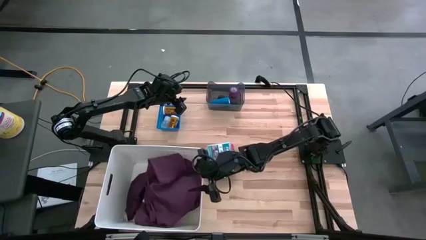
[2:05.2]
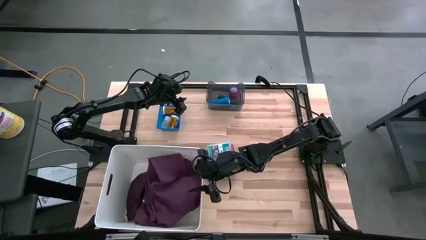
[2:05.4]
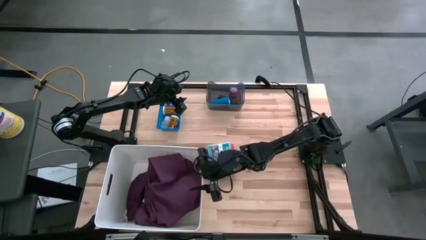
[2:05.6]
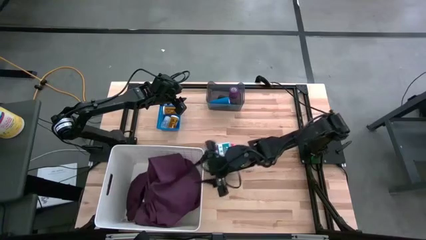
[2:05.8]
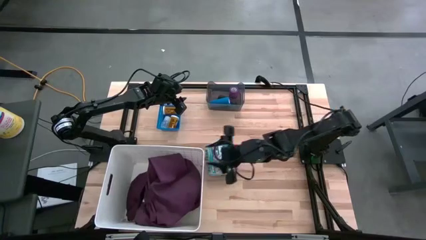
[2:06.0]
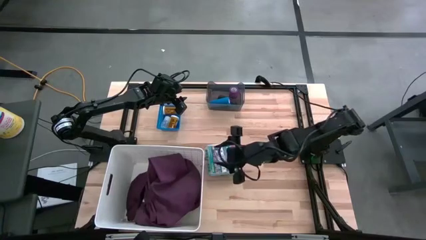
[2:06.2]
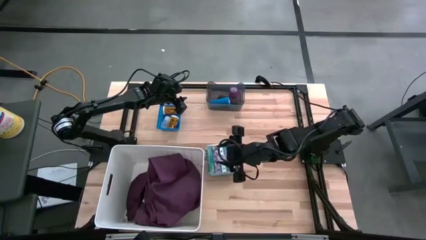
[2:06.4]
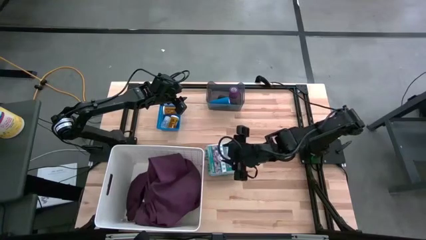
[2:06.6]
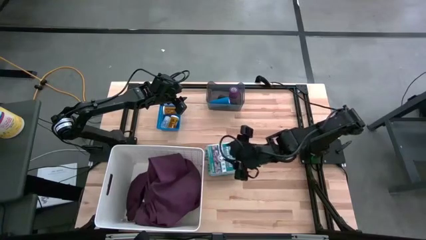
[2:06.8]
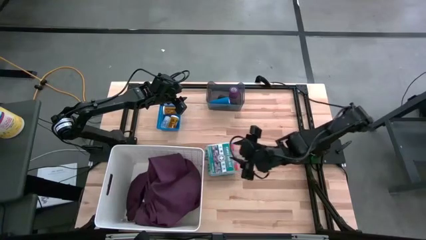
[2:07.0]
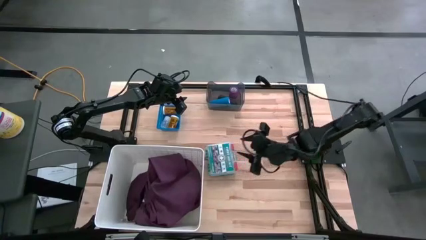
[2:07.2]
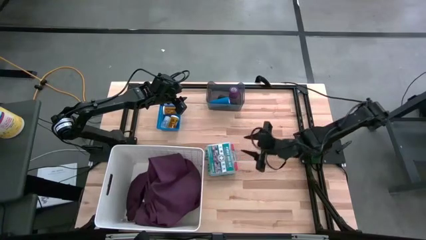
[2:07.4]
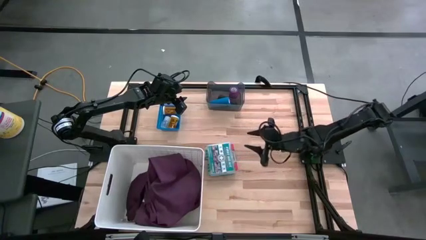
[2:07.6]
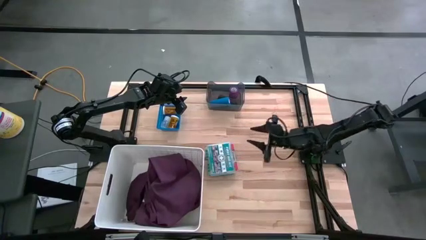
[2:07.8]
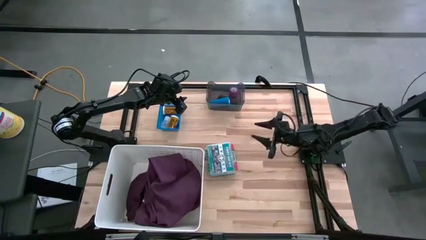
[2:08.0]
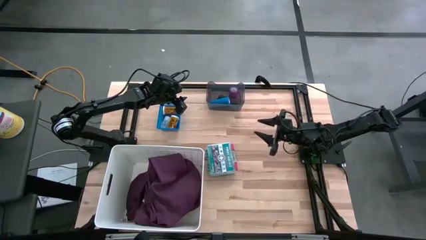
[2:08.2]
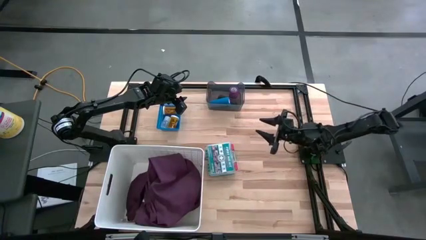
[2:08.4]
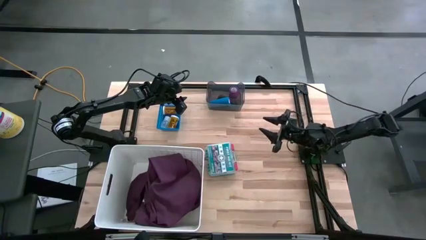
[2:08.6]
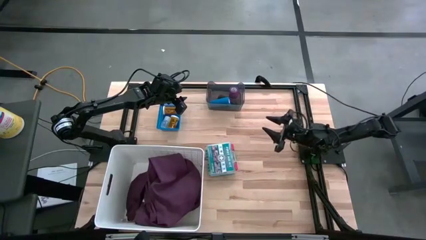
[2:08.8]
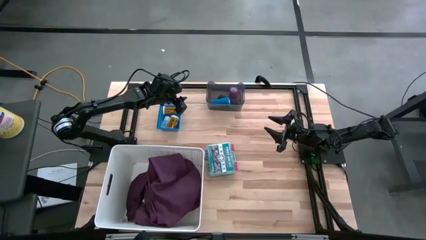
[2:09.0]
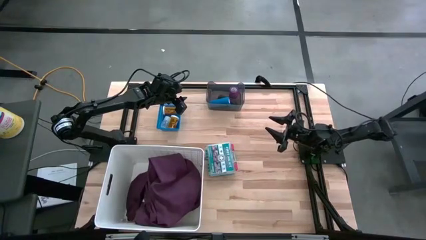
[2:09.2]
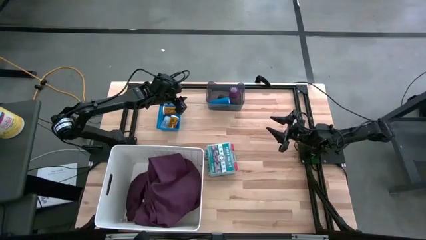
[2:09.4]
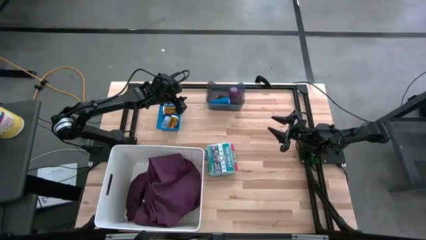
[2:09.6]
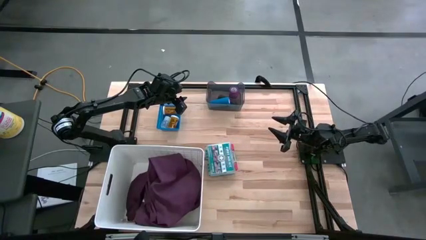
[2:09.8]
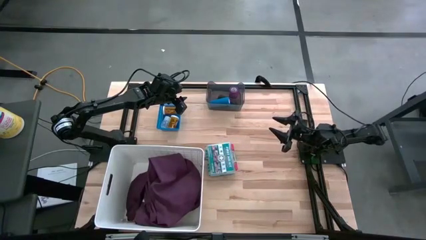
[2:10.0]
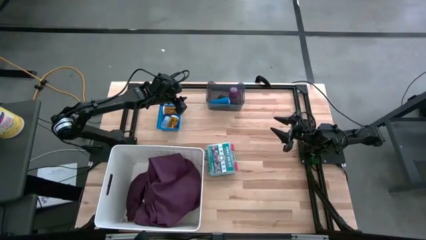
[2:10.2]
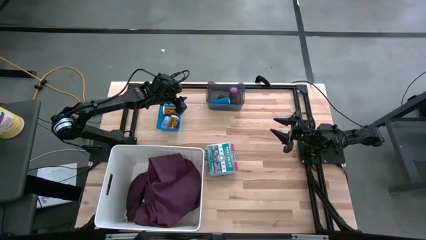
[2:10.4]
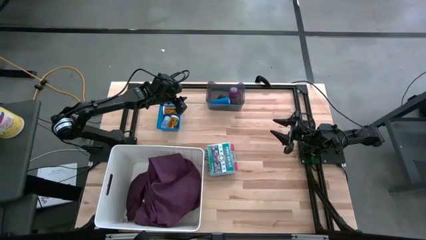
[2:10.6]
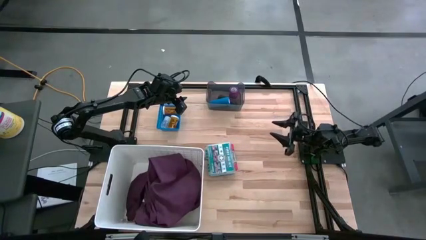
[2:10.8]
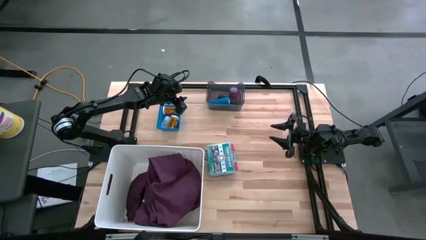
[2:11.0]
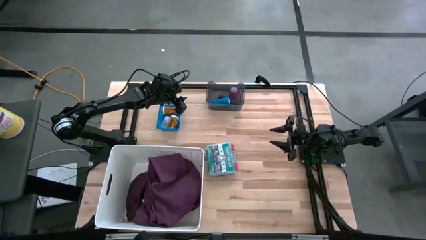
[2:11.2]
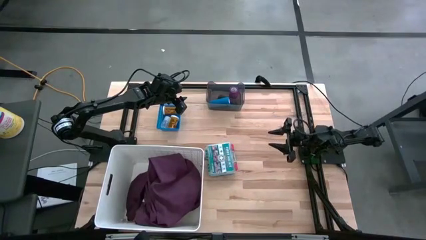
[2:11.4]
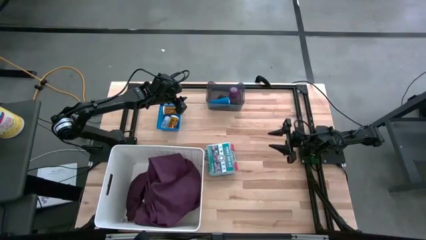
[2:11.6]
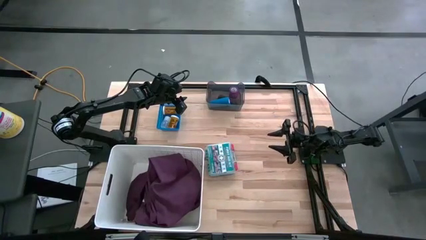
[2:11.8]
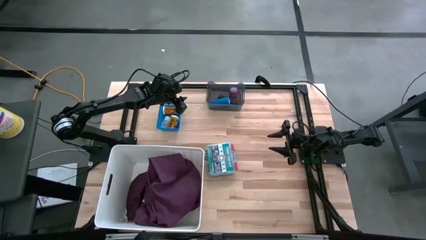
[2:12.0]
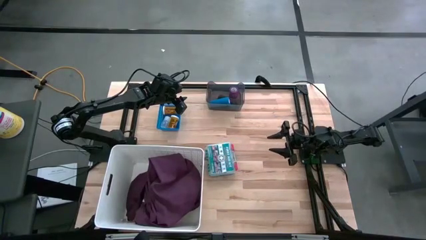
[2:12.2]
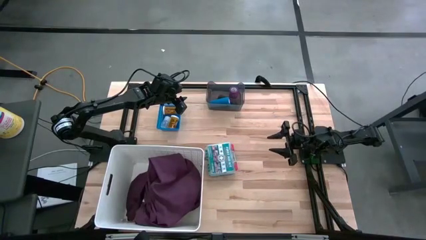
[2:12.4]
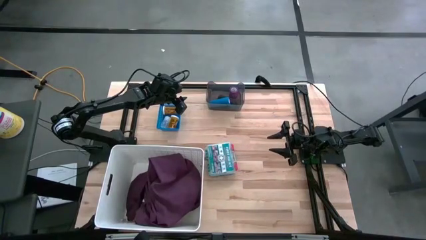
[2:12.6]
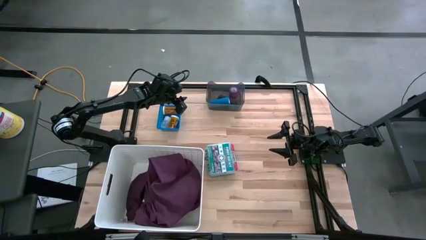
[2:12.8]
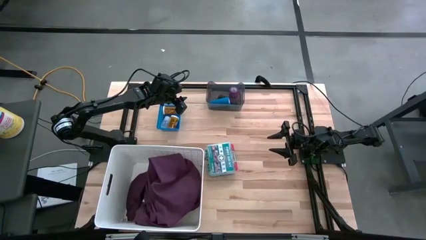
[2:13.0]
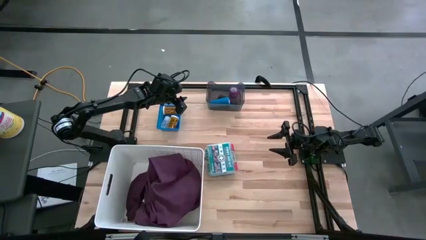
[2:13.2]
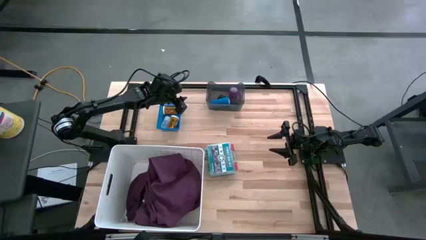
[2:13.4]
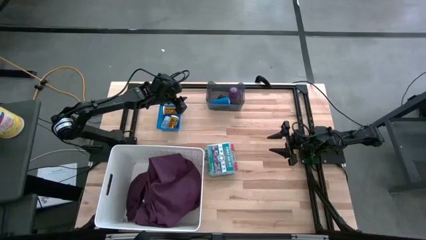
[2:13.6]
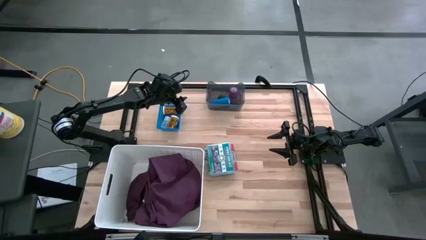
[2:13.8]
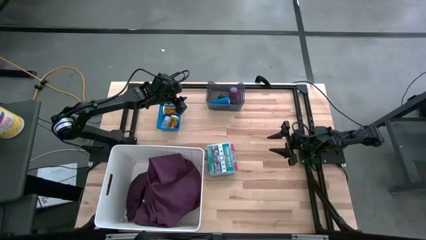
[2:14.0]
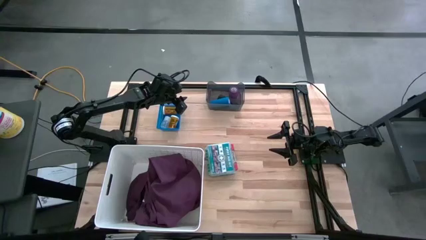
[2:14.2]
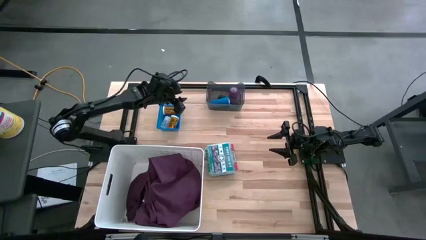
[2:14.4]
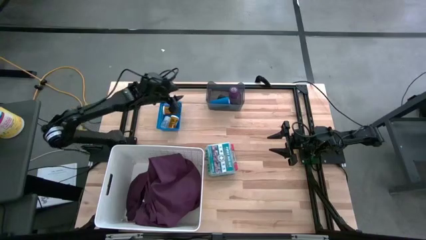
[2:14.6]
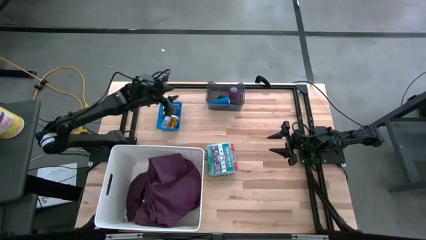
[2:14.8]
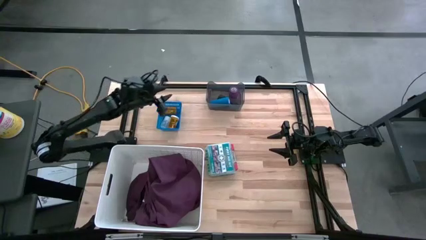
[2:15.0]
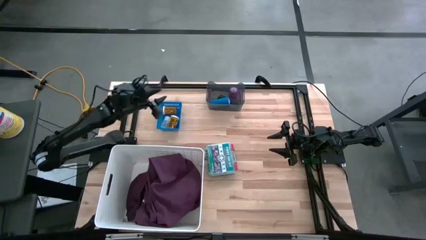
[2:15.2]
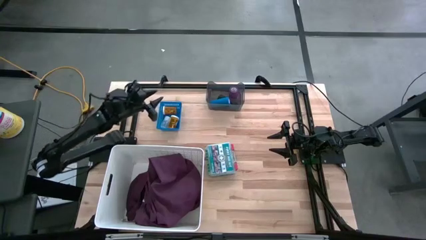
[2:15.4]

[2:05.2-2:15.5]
Task: Pick & place medical supplies in basket/bin
Return to Home Position

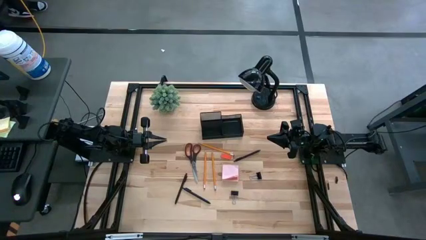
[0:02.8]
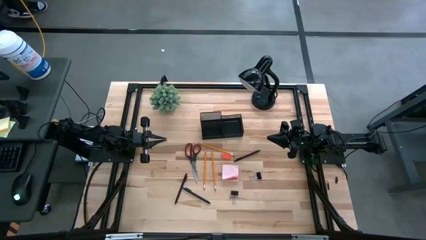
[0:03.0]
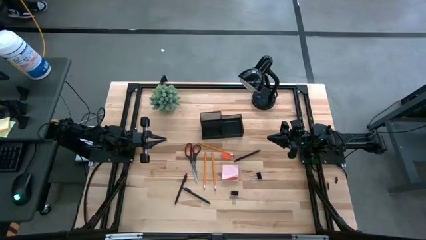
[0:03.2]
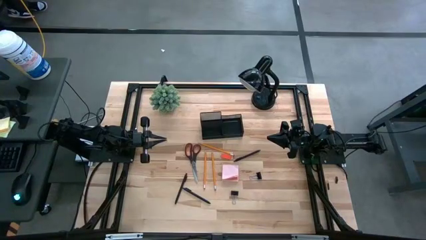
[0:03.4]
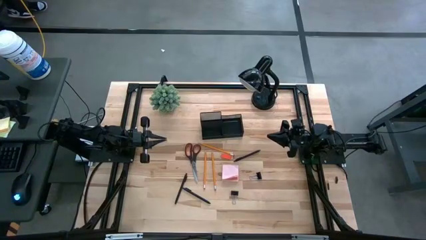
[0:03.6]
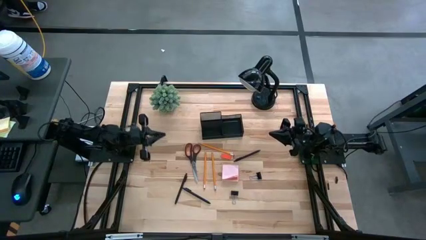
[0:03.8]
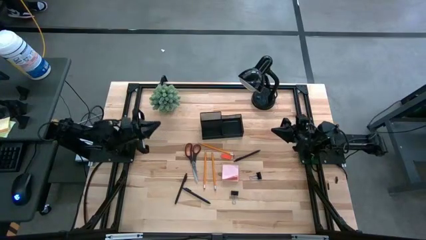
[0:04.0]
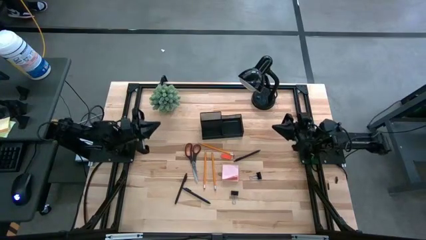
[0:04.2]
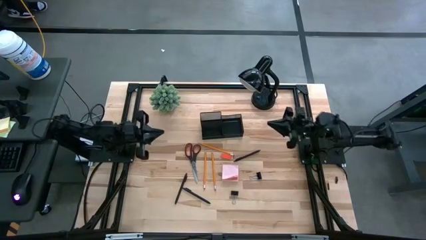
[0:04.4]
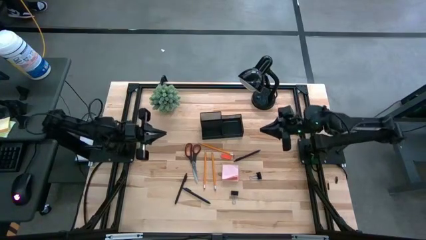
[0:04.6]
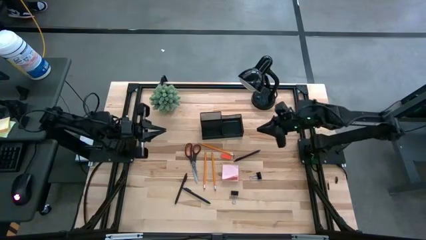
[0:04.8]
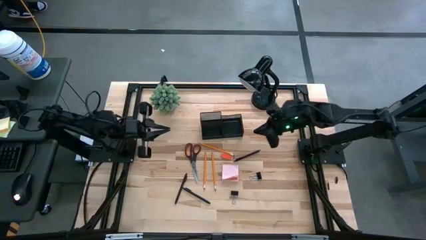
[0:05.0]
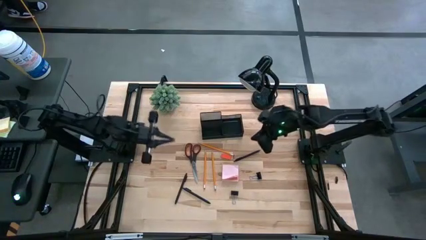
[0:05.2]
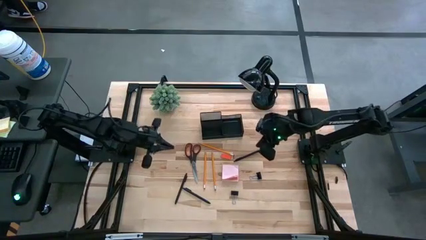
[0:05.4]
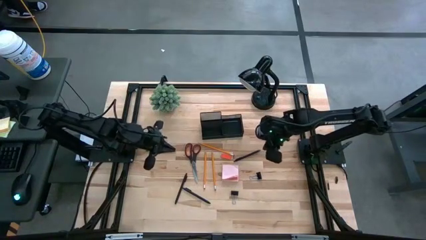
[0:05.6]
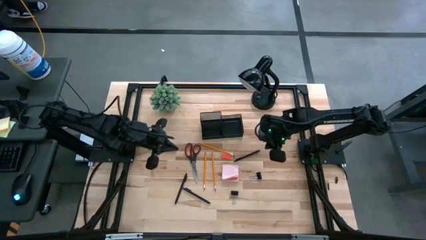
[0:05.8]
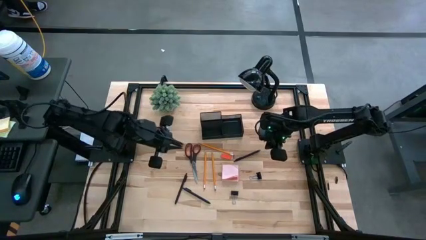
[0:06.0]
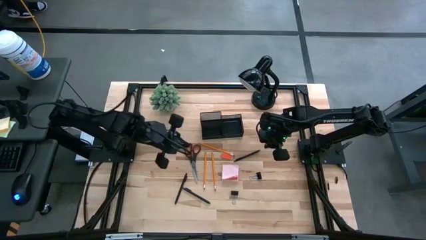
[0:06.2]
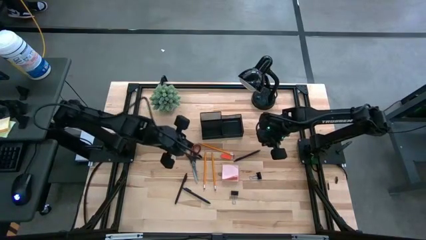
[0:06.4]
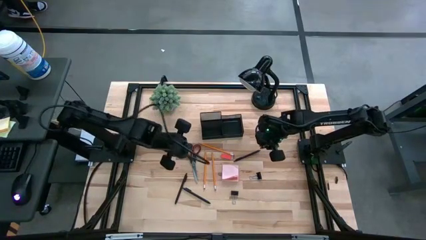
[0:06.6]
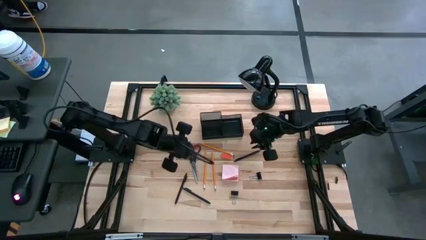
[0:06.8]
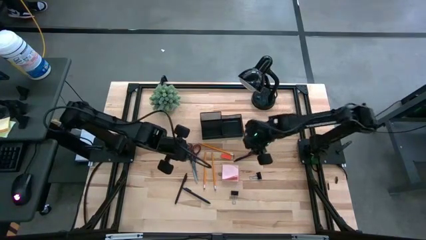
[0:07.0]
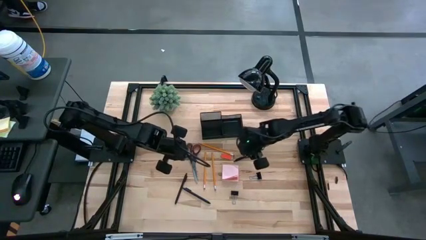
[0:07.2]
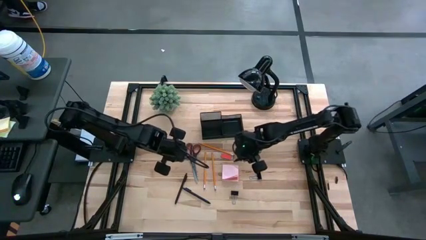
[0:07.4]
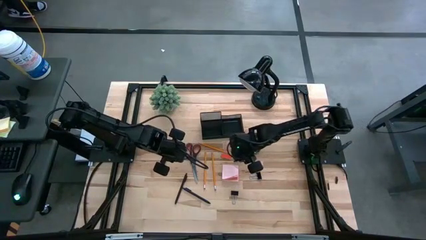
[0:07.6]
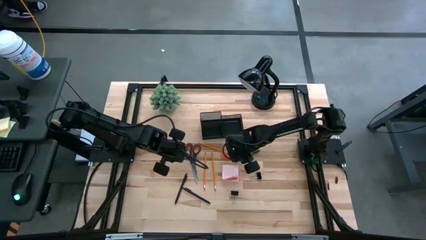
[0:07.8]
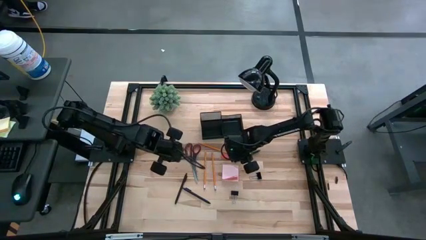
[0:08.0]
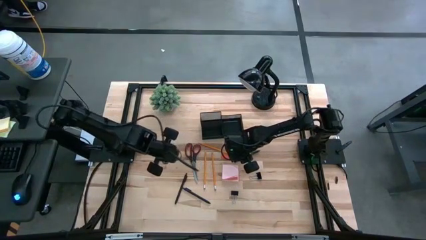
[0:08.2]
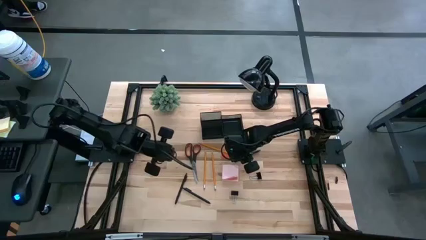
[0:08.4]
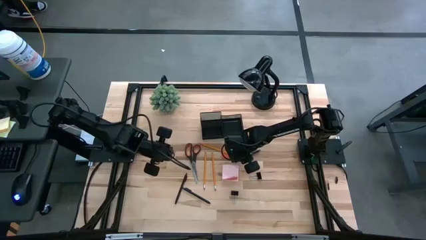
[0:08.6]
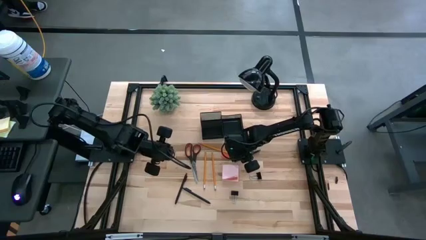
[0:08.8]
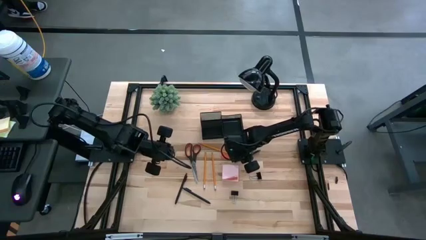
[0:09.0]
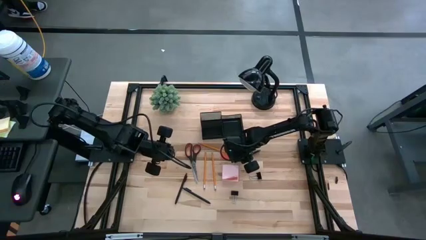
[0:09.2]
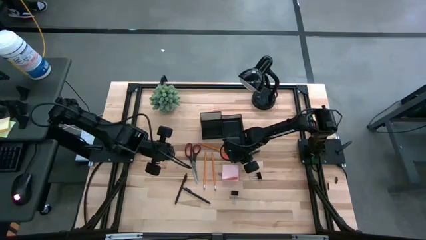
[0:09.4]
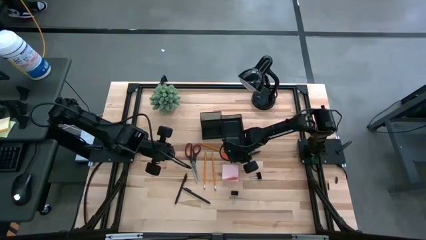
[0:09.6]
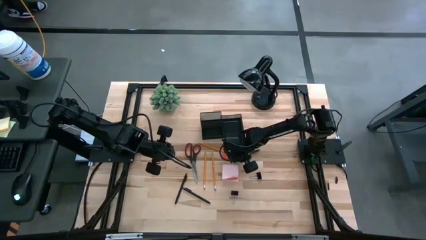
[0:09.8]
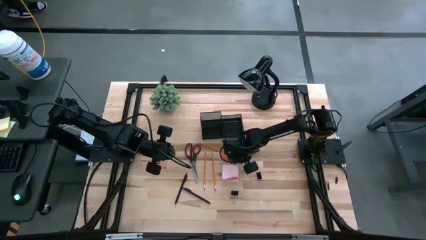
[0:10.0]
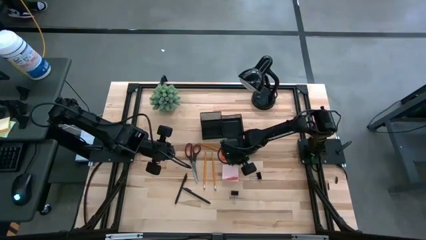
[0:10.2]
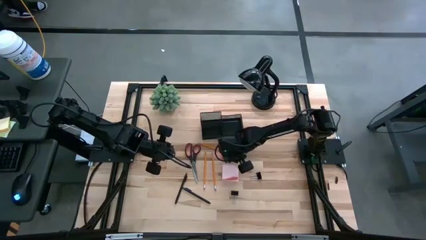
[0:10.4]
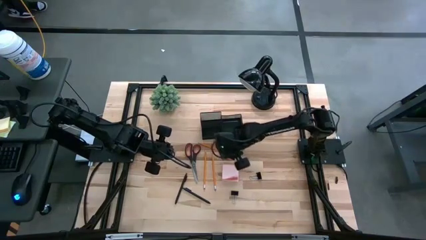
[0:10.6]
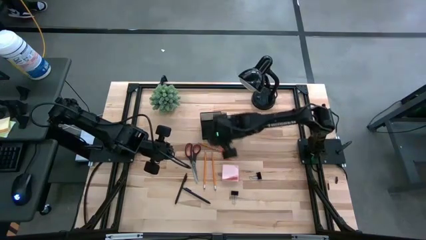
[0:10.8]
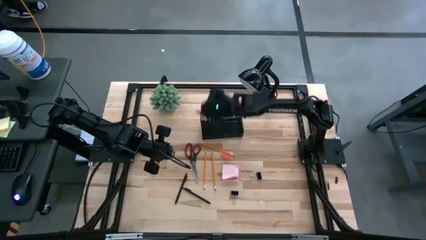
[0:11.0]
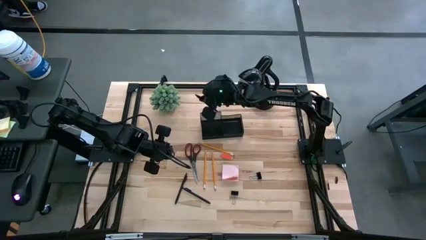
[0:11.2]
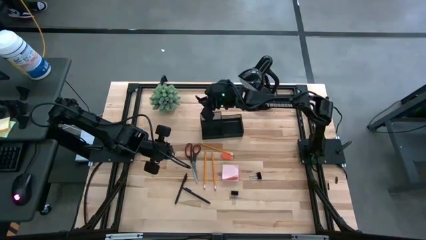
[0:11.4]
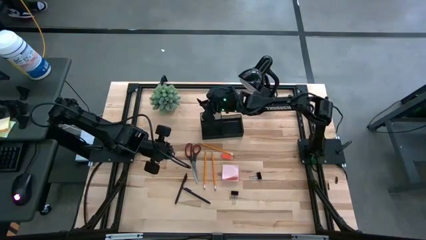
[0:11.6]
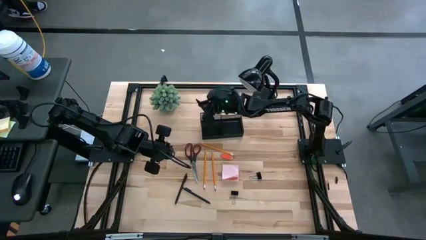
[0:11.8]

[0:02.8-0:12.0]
Task: Pick and place office supplies into organizer
Put the top black pen into the desk organizer
